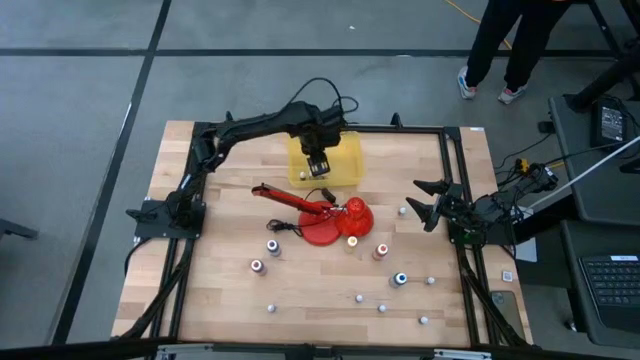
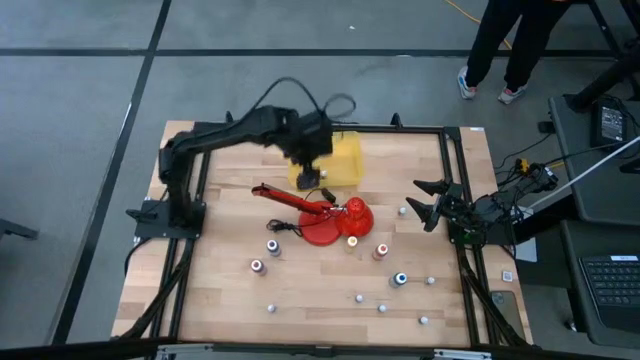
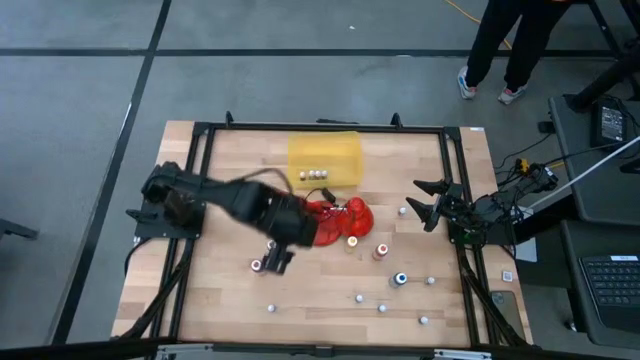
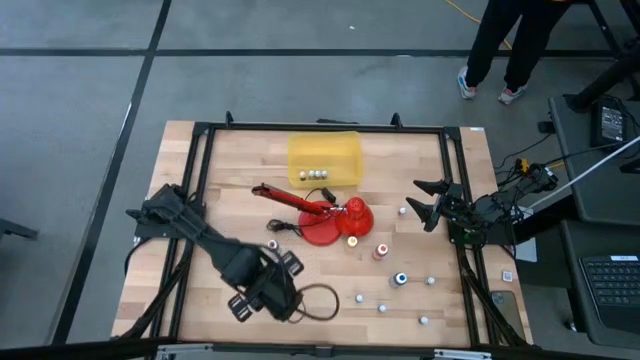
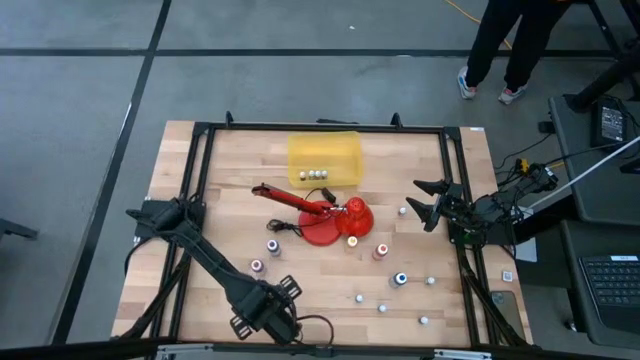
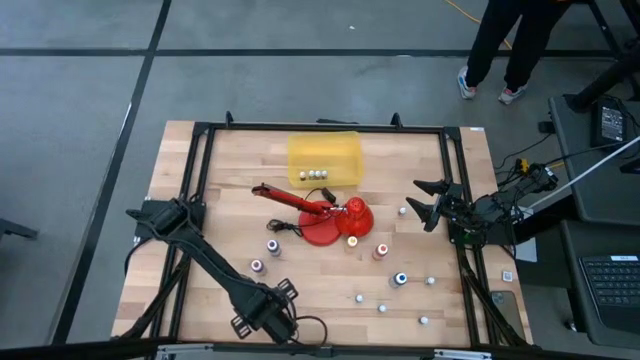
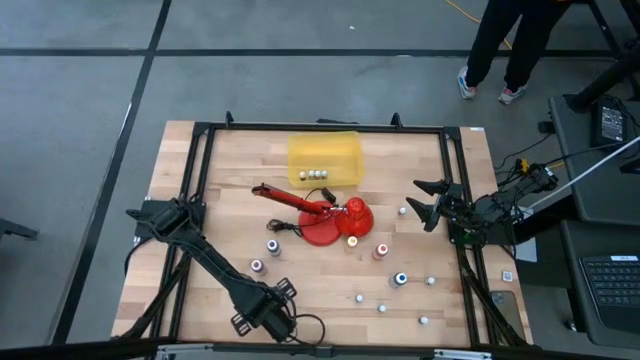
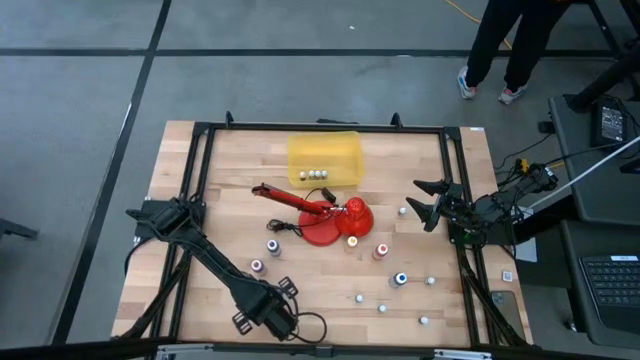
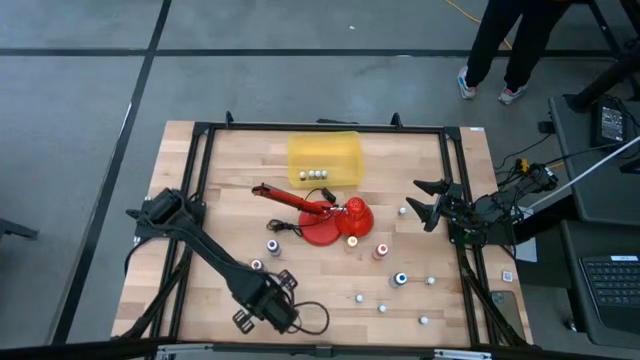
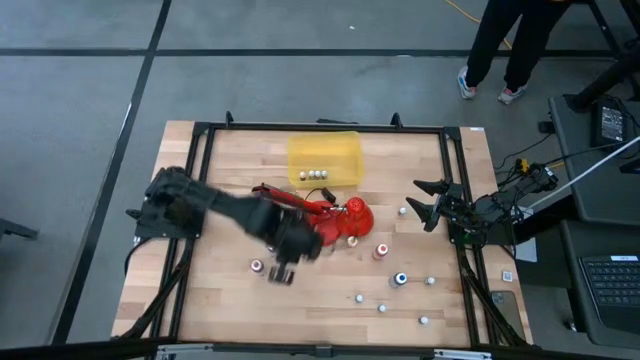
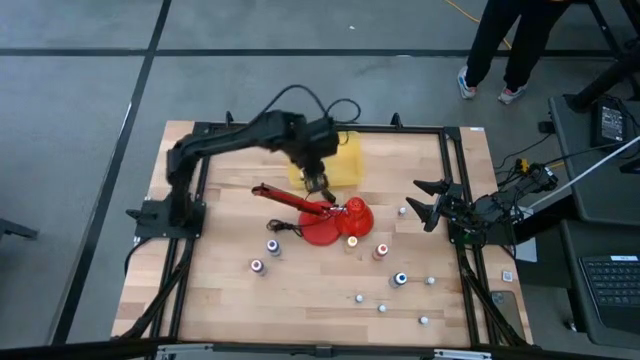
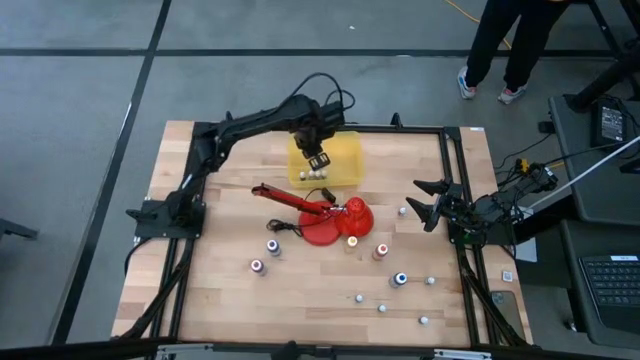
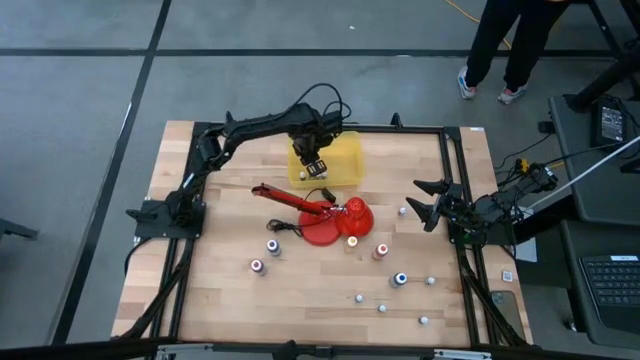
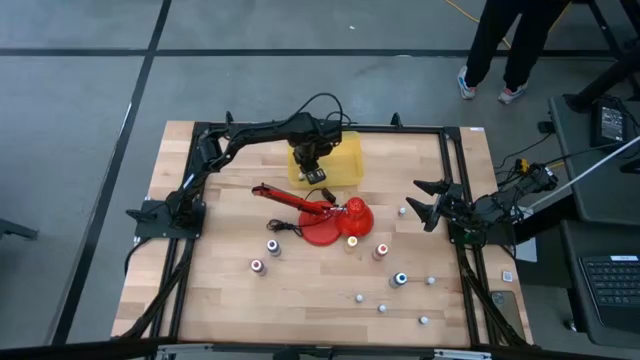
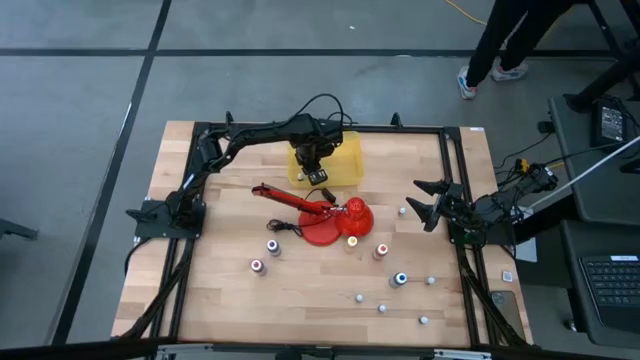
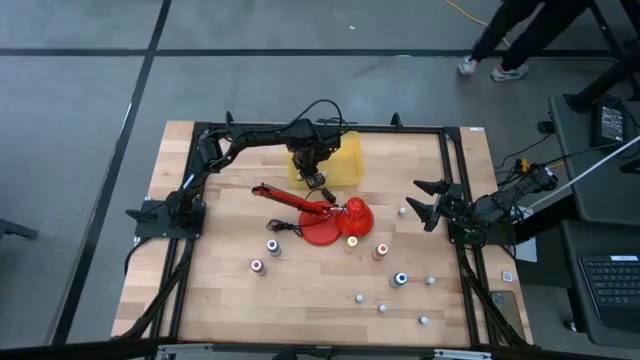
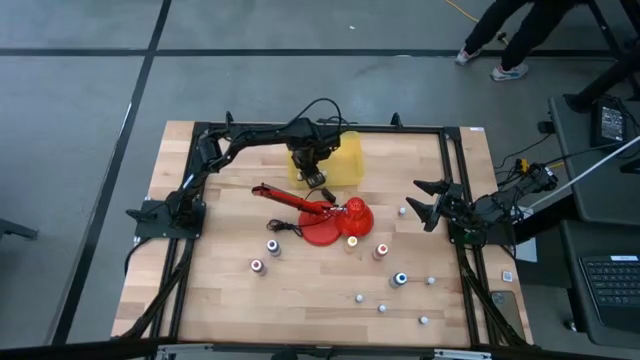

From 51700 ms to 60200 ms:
Task: Pick & Place food coloring
Put the black food coloring bottle into the yellow bin

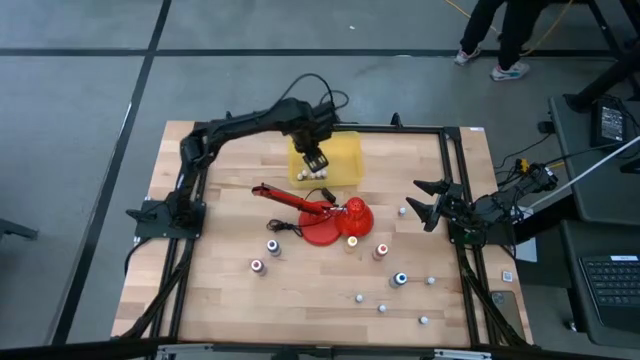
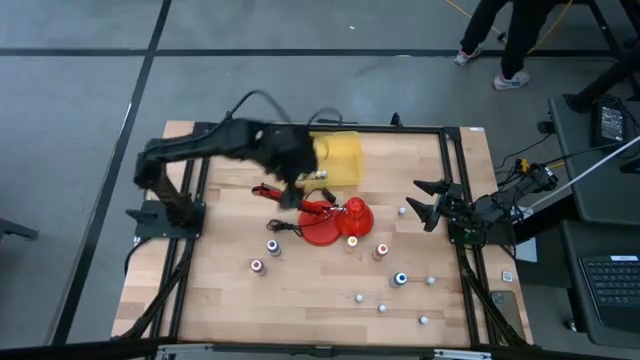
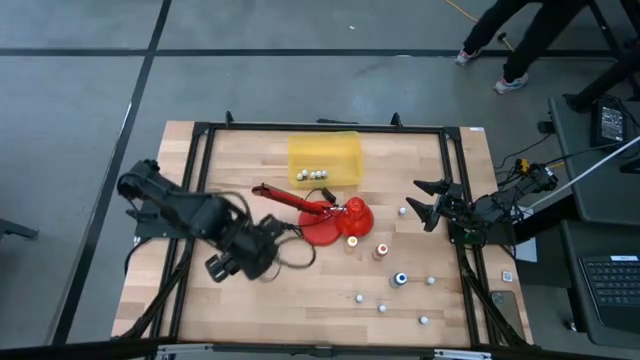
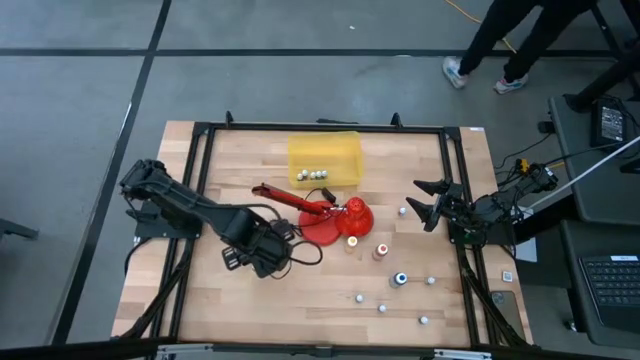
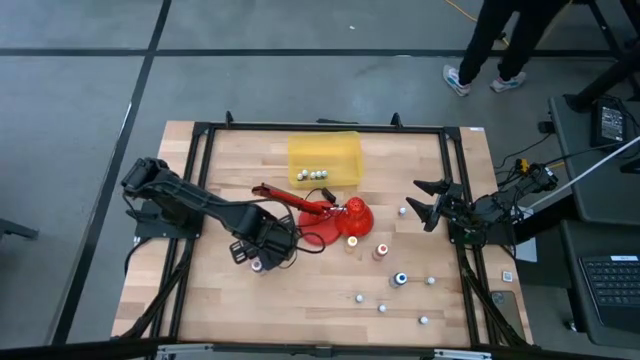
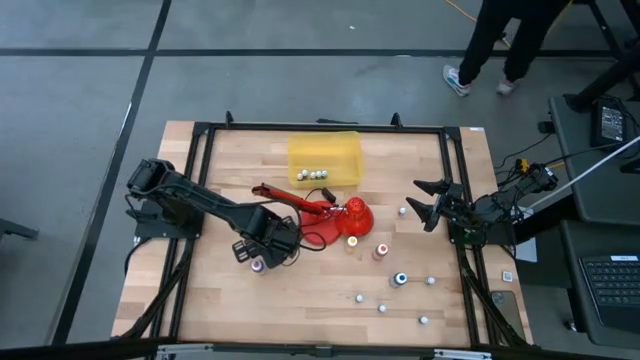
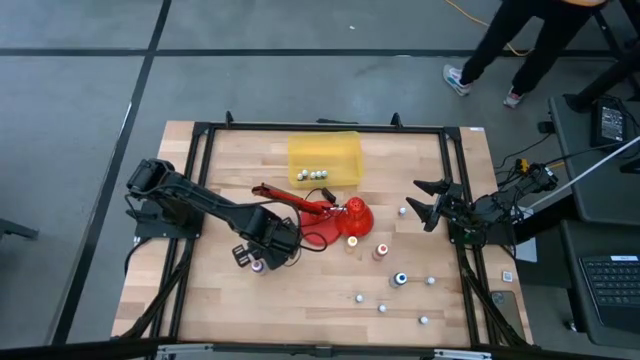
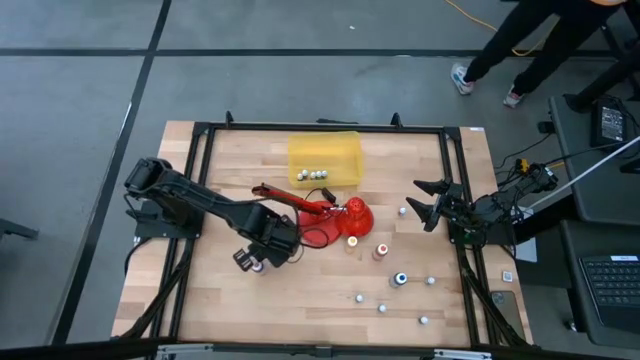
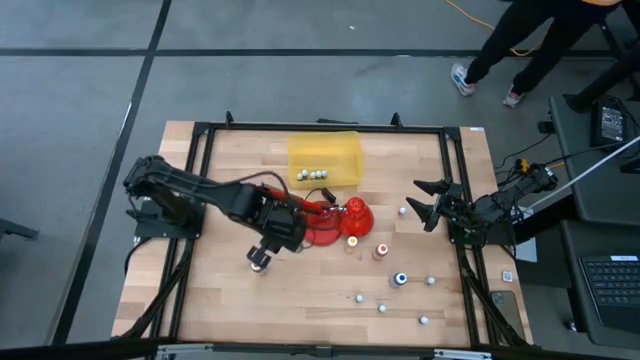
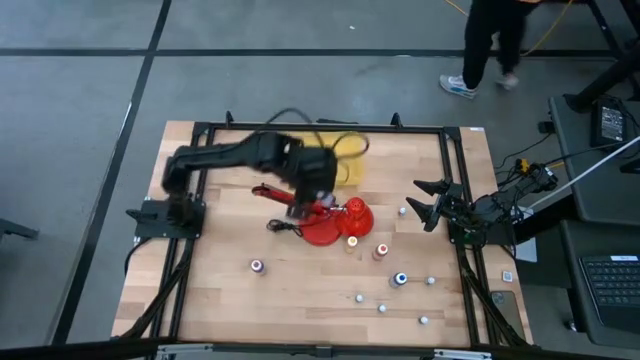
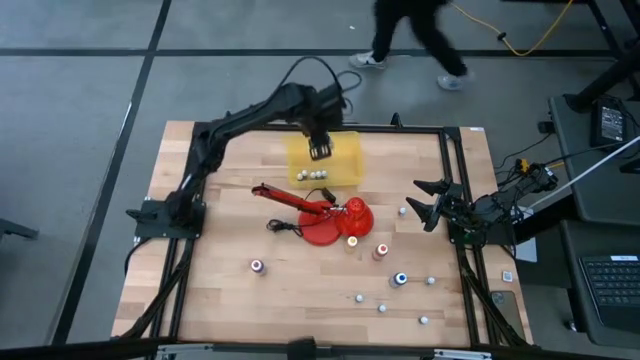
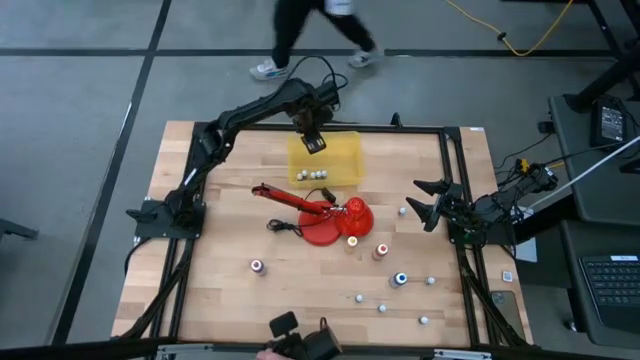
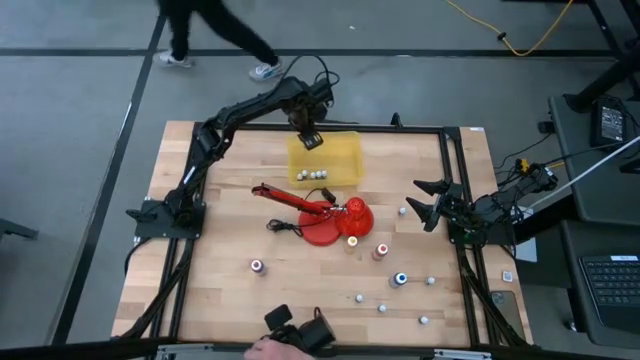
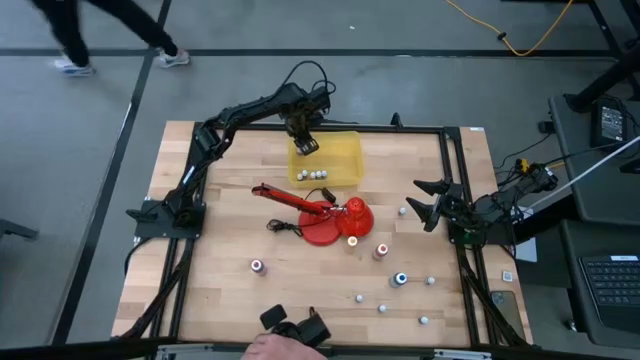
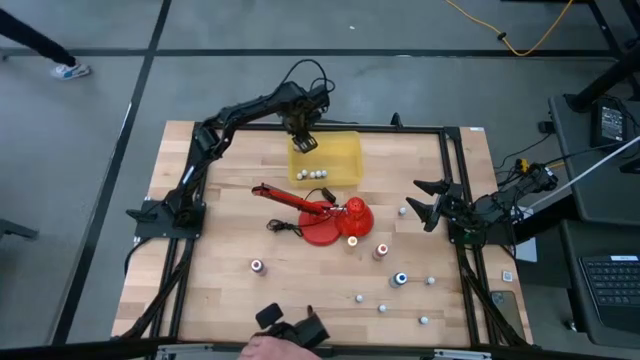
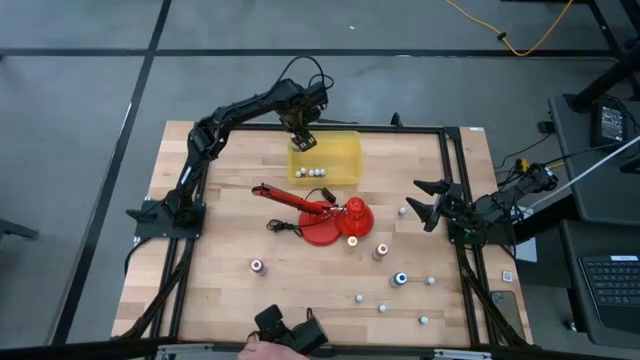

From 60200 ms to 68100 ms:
Put the violet food coloring bottle into the yellow bin

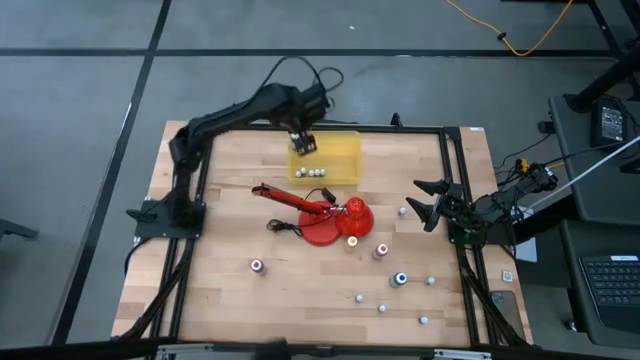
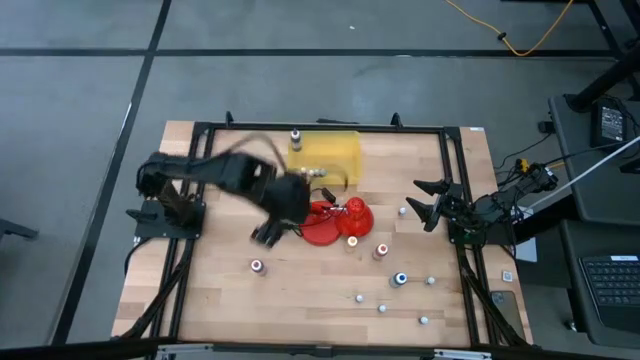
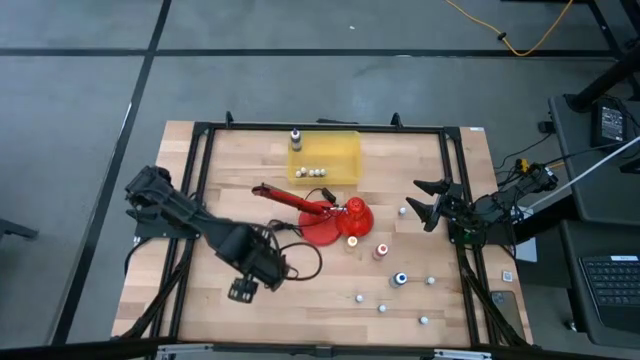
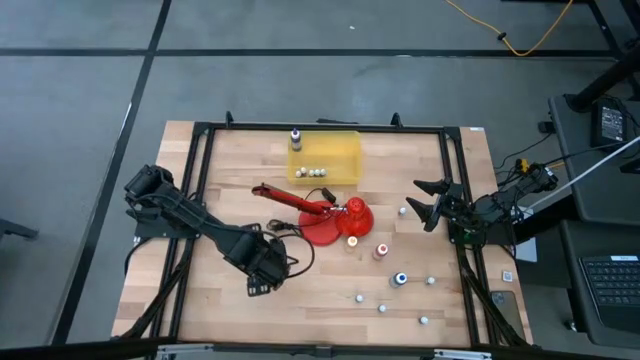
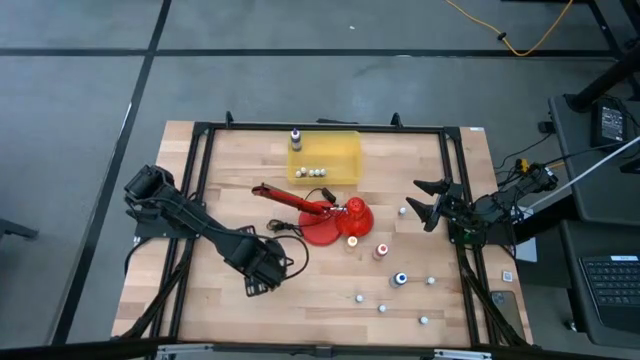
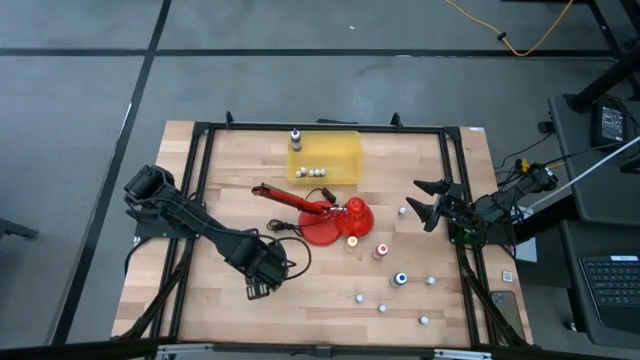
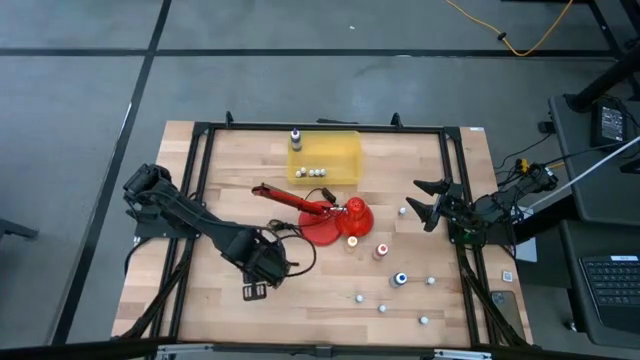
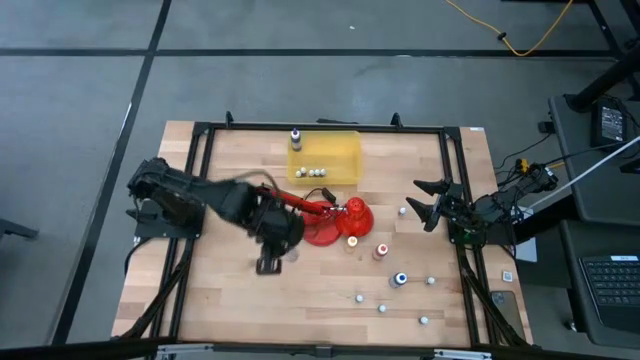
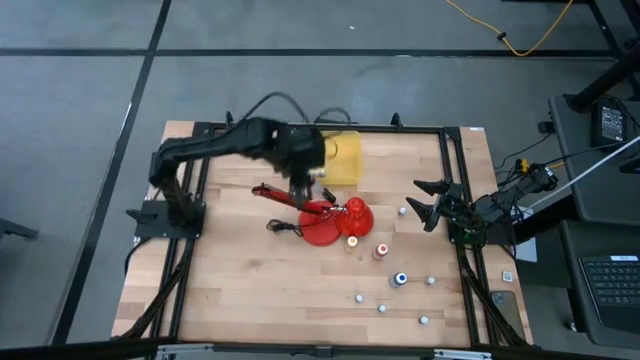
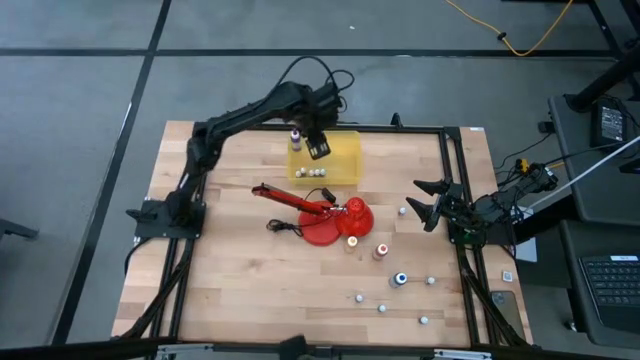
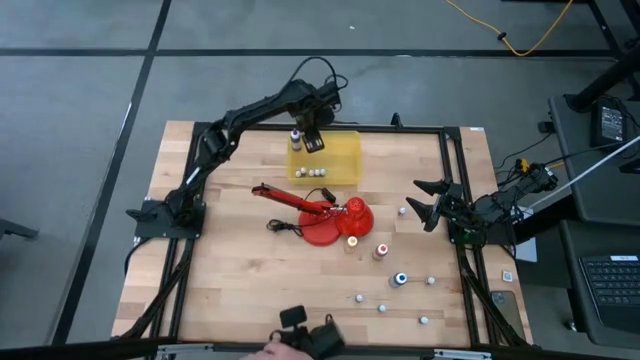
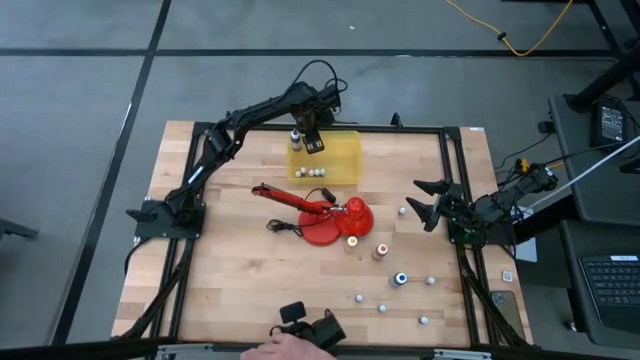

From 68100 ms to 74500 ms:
Put the pink food coloring bottle into the yellow bin
